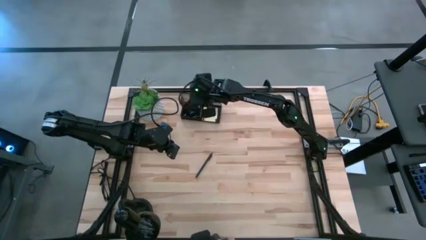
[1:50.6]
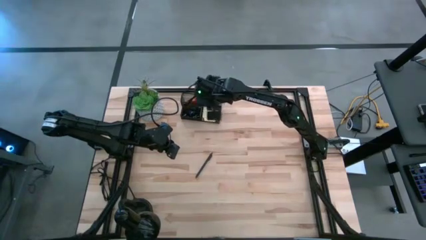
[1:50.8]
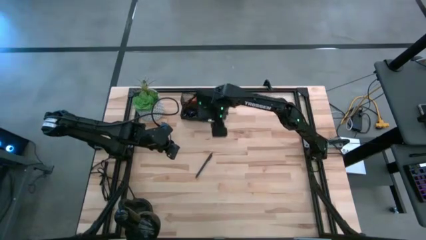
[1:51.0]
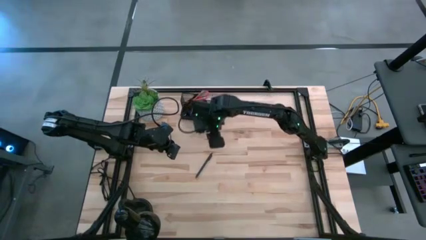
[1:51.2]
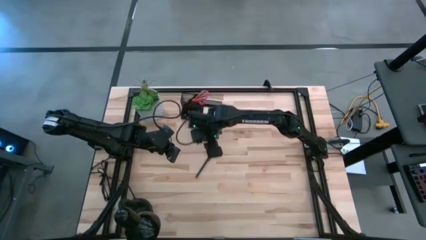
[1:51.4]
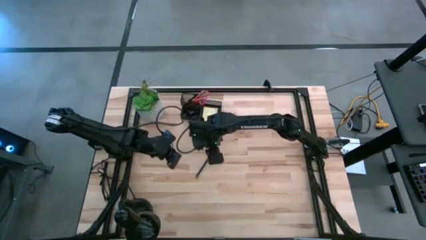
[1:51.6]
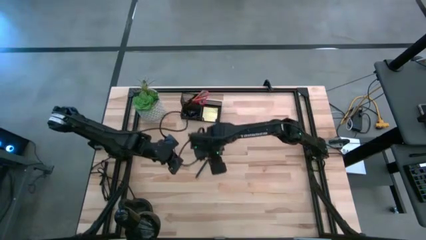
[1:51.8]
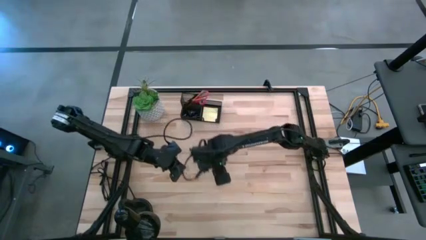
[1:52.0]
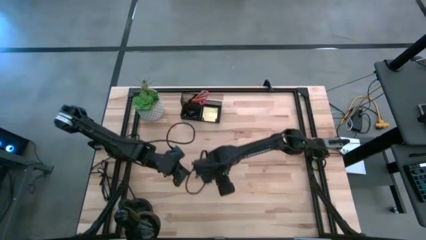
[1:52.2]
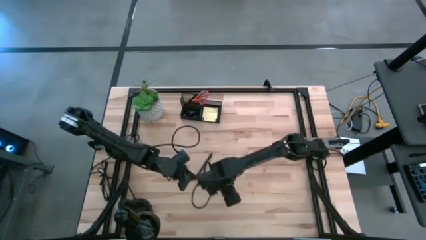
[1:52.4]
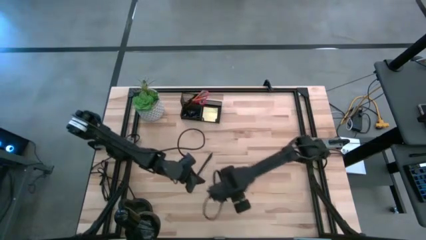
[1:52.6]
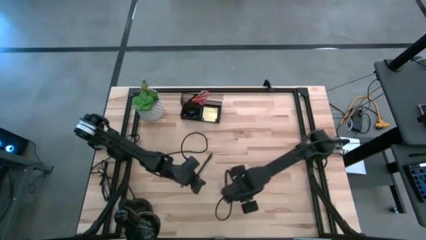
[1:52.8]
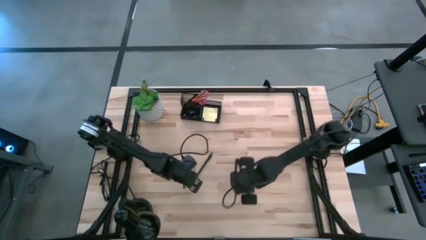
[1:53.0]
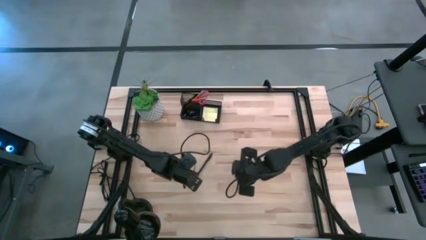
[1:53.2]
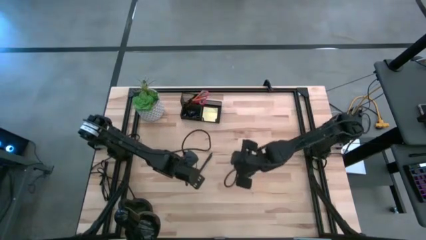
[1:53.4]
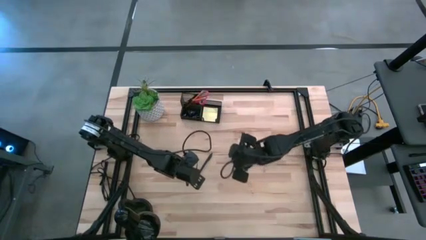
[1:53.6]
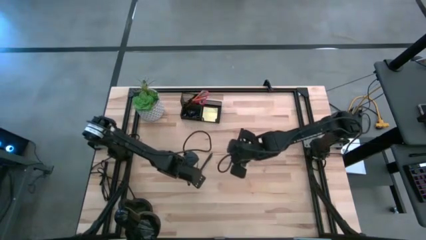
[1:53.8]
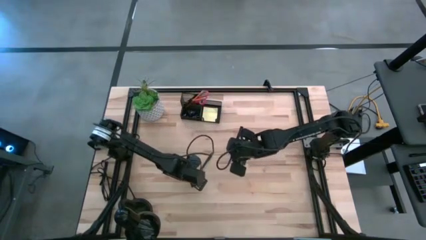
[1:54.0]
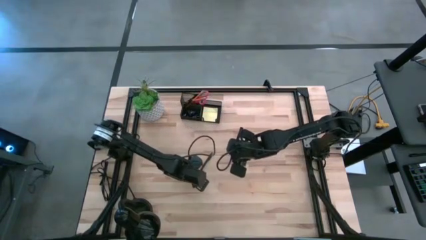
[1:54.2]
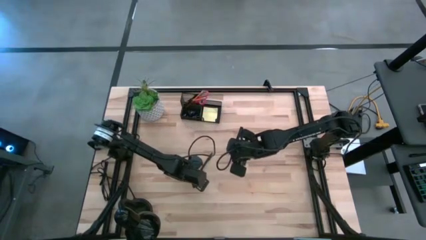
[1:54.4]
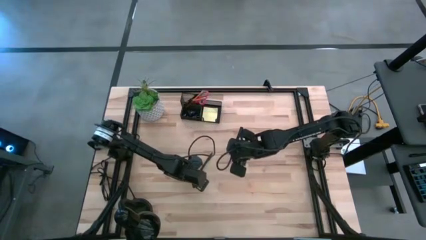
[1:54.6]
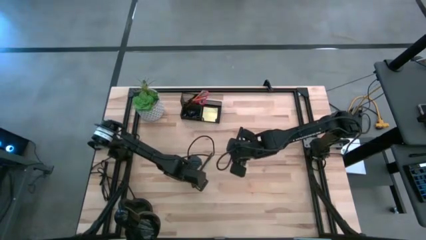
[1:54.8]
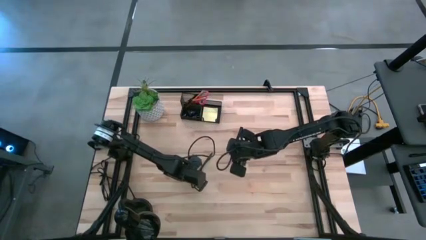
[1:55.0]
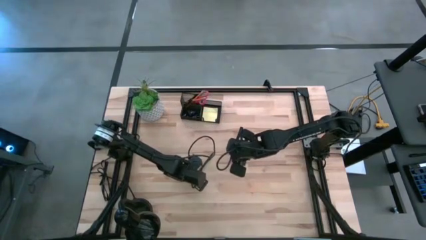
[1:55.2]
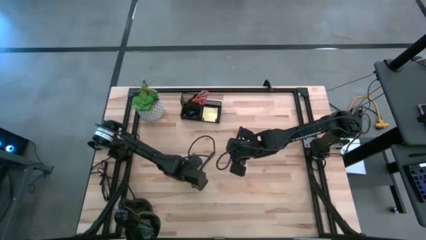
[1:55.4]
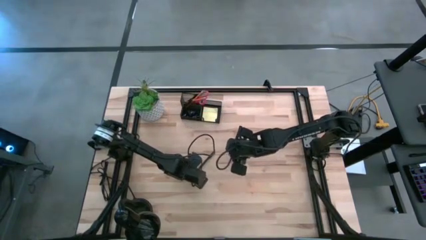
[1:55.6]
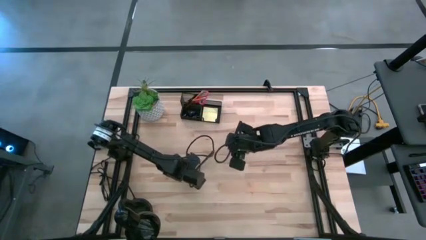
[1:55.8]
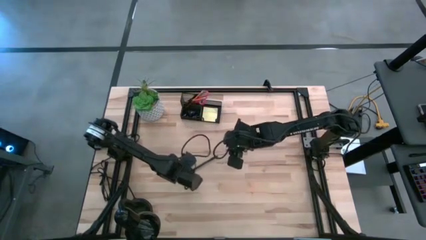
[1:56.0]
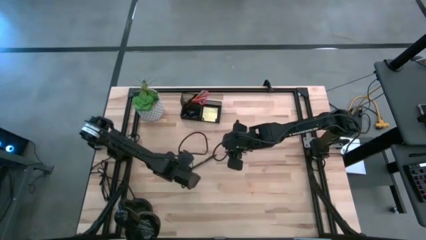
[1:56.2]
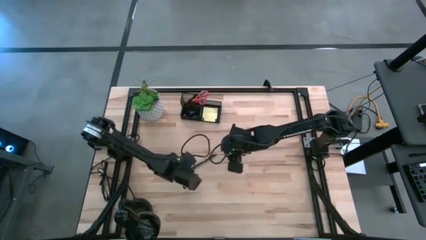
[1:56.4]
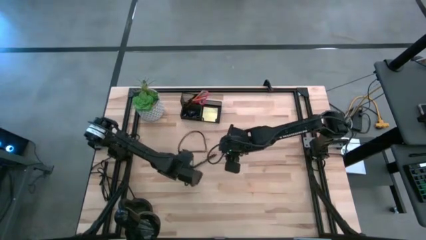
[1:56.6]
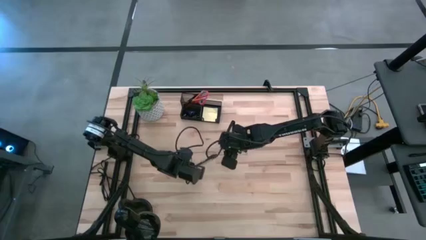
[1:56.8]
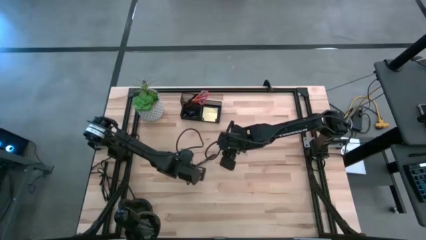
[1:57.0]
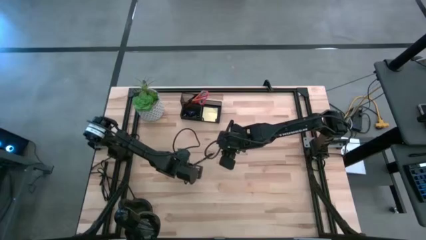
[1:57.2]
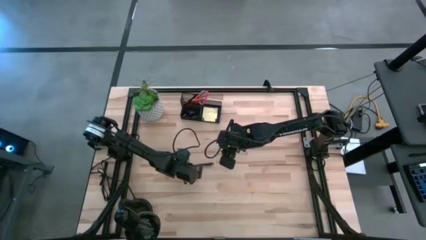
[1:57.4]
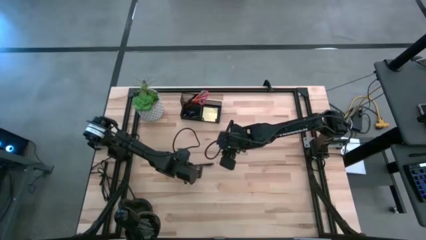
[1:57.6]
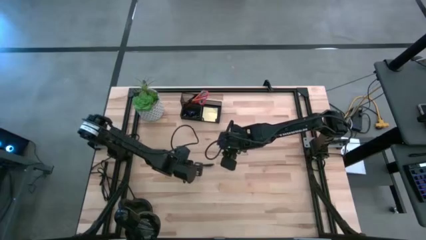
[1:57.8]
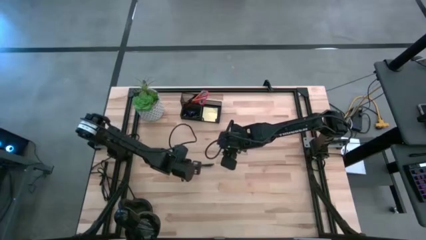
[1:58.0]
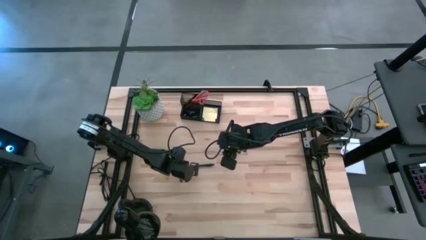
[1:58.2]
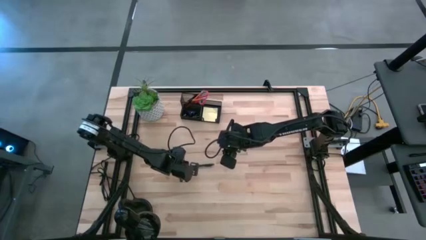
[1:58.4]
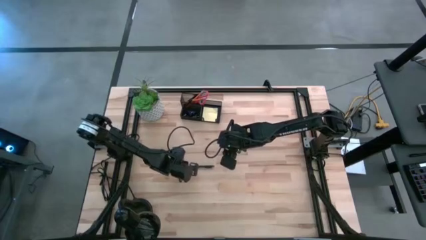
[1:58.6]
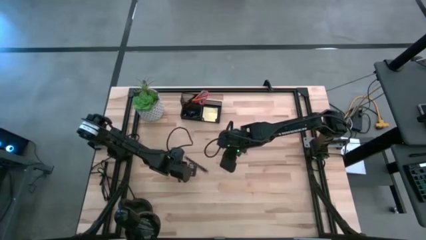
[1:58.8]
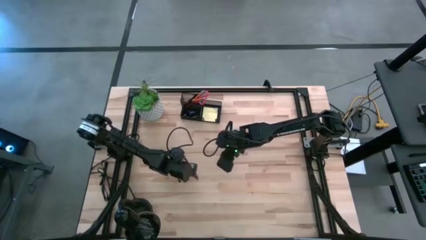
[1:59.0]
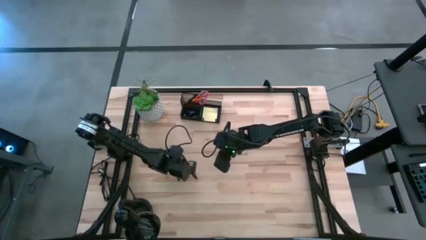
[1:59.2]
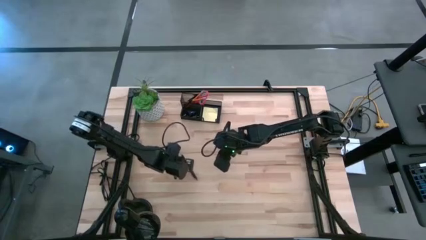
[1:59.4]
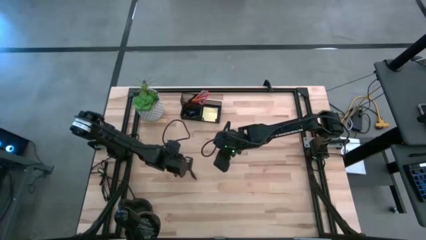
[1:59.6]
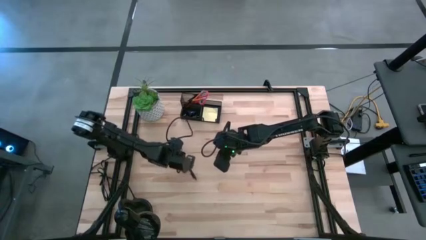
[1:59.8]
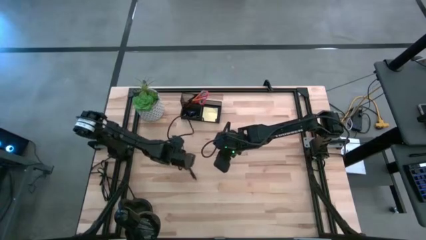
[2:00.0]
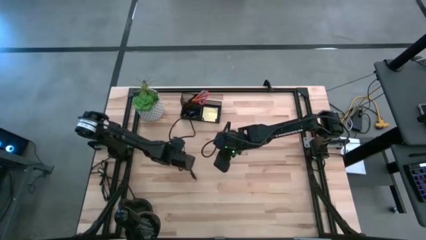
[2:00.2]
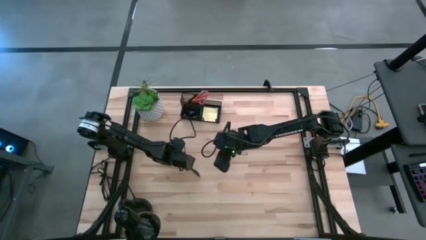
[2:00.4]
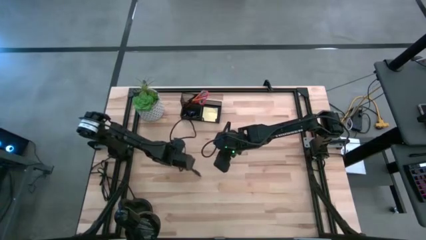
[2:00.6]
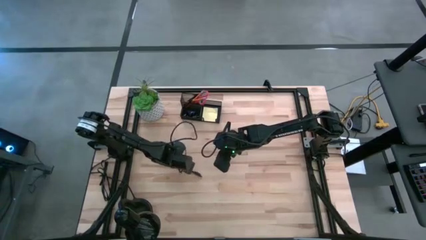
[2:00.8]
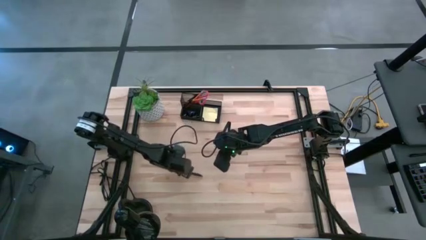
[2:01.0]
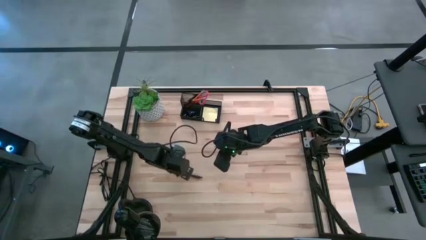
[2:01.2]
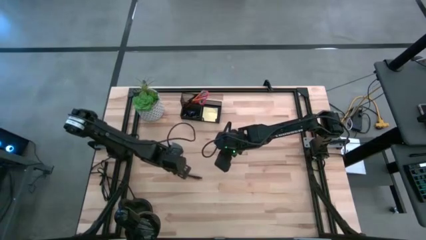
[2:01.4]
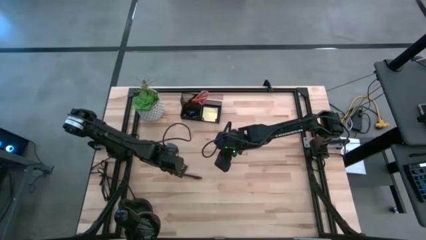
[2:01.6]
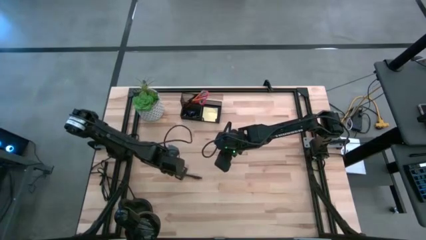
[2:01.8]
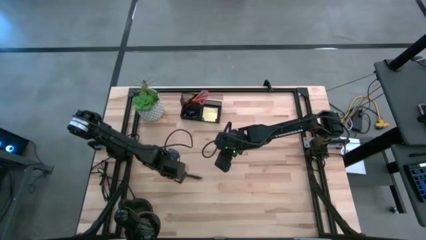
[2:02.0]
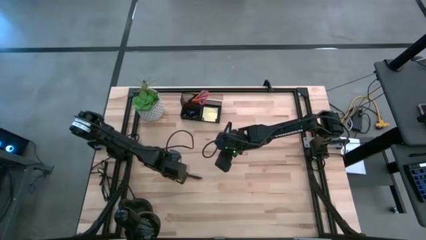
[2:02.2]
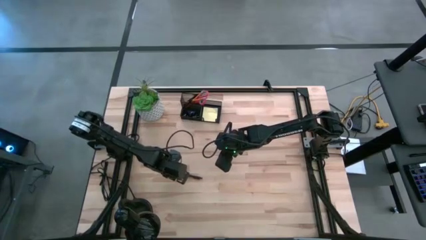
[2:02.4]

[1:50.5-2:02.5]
Task: Pick and place office supplies into organizer
Put the pen into the top left section of the black desk organizer

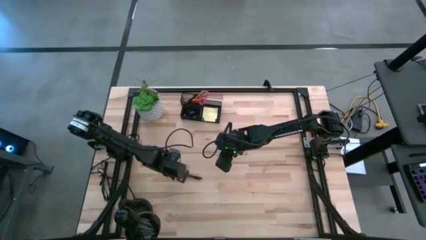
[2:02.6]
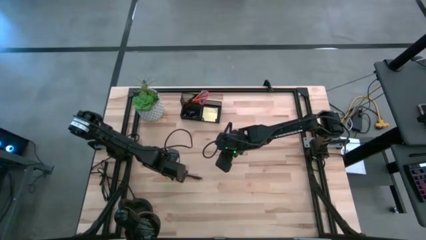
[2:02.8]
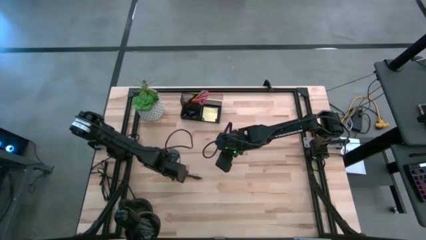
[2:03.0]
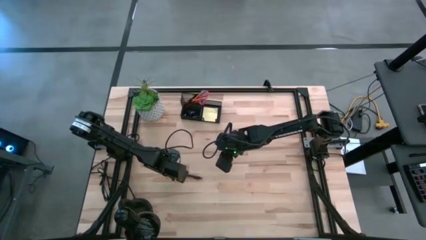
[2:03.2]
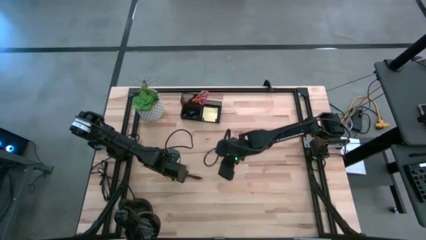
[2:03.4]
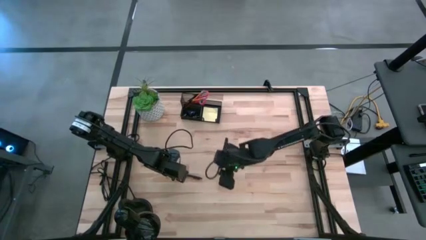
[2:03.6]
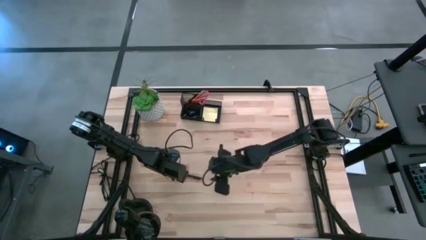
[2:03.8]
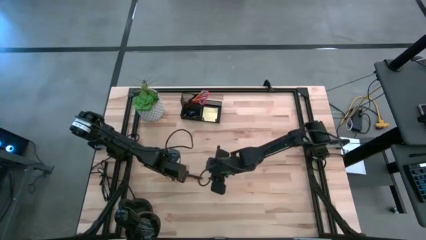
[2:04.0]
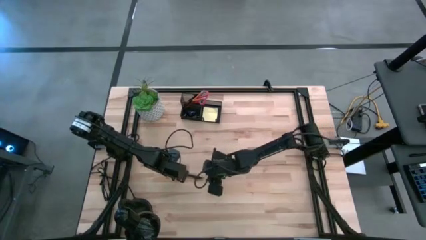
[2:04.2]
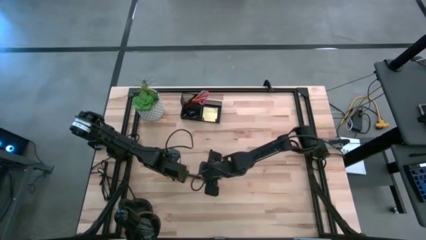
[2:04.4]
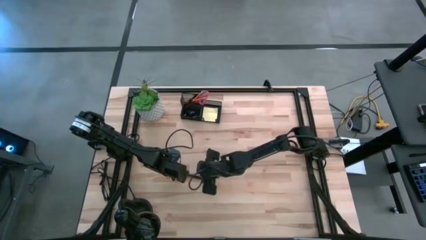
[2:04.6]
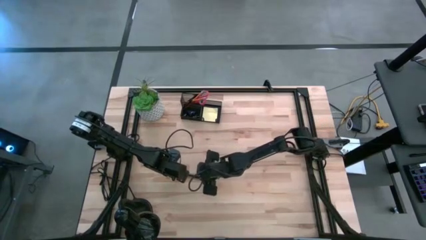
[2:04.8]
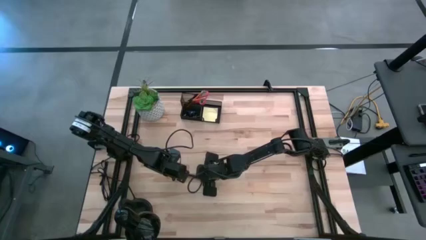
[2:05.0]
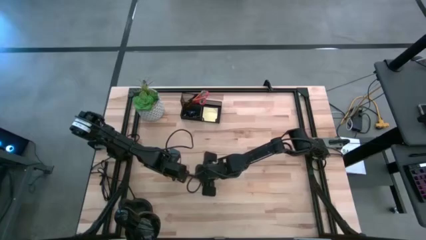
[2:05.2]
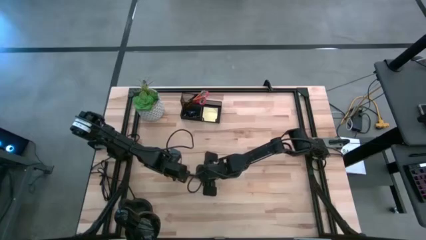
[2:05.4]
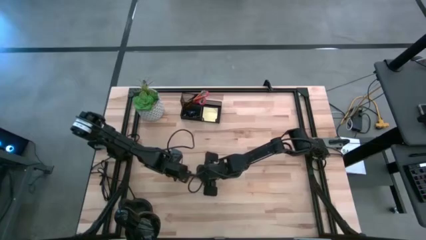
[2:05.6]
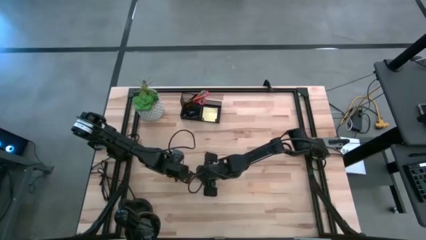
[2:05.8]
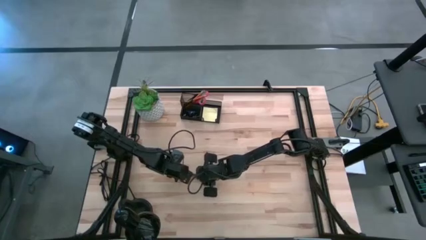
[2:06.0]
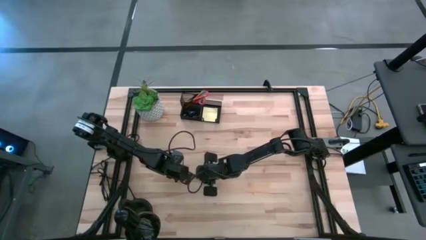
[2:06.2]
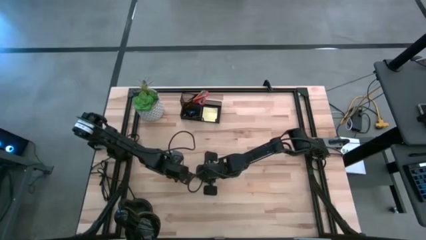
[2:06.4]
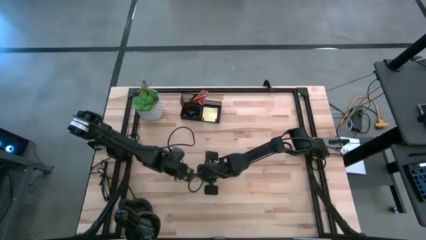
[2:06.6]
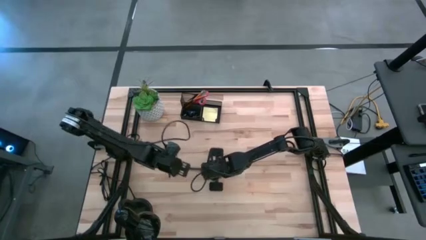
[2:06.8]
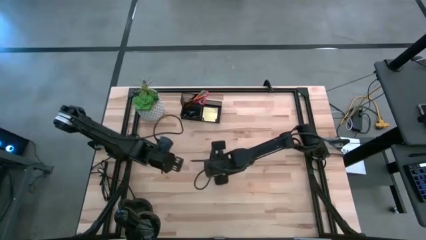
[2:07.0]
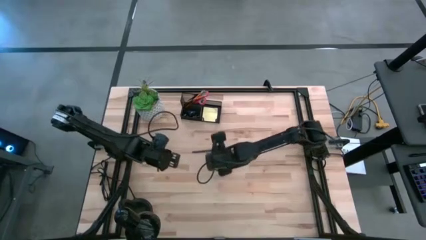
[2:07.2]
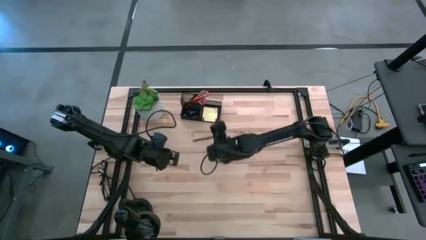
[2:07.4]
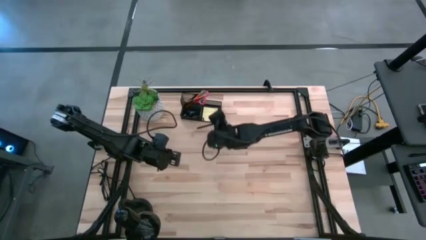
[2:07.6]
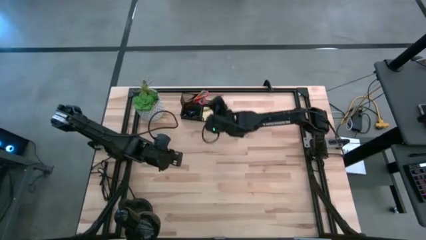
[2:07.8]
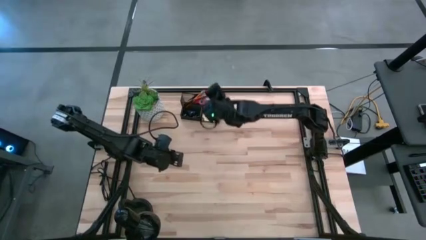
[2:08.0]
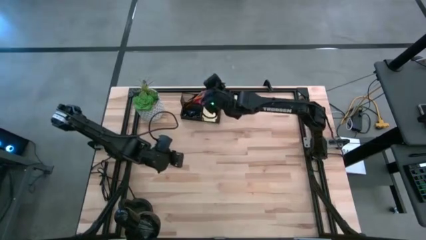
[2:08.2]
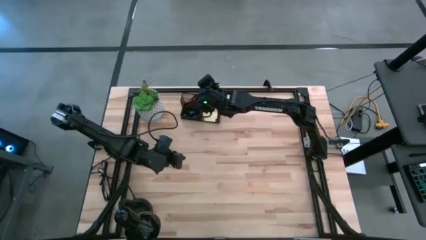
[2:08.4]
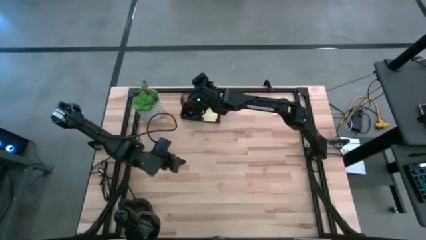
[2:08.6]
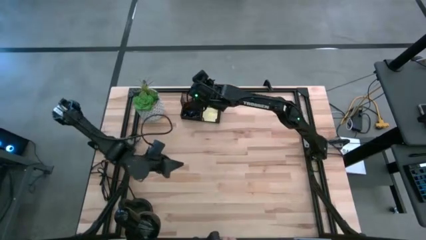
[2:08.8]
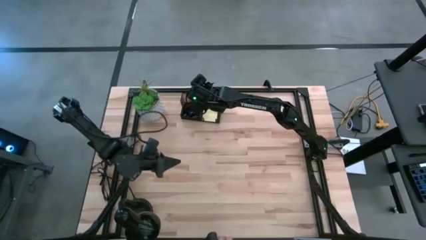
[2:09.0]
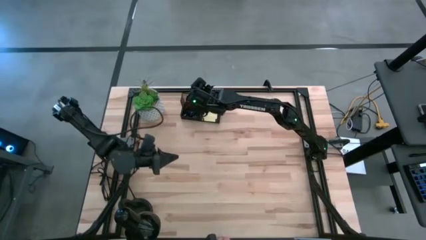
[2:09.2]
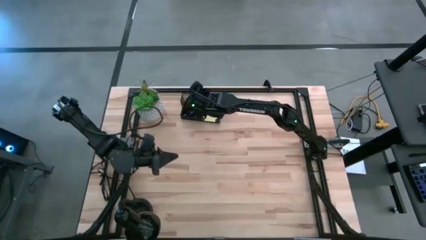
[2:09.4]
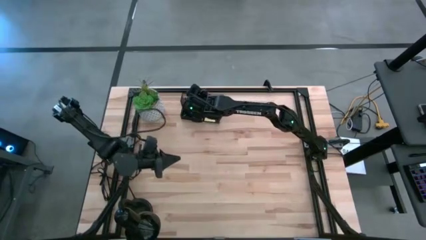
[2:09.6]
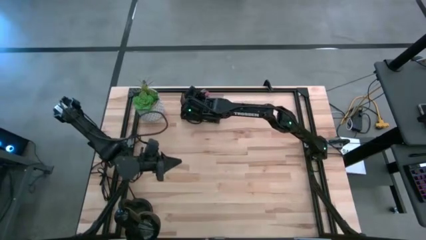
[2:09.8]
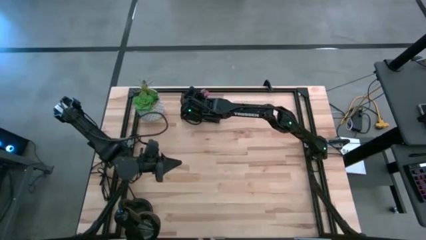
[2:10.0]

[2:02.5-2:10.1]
Put the pen into the top left section of the black desk organizer
